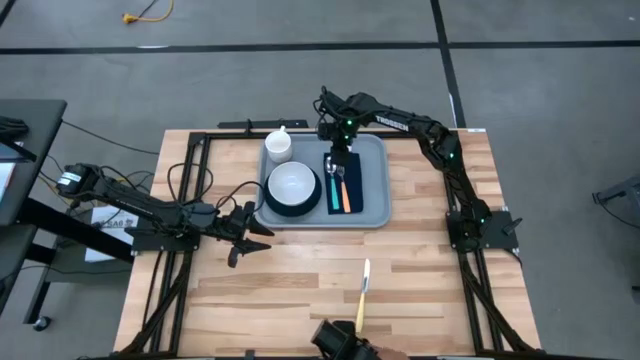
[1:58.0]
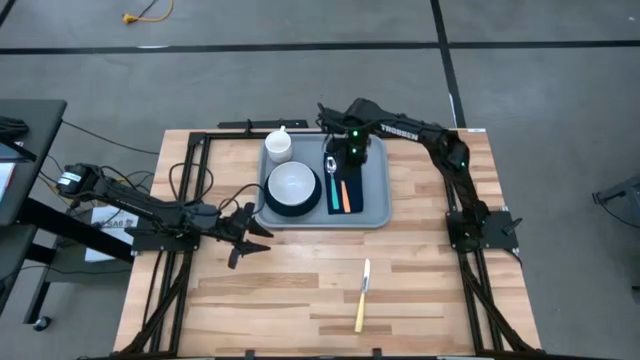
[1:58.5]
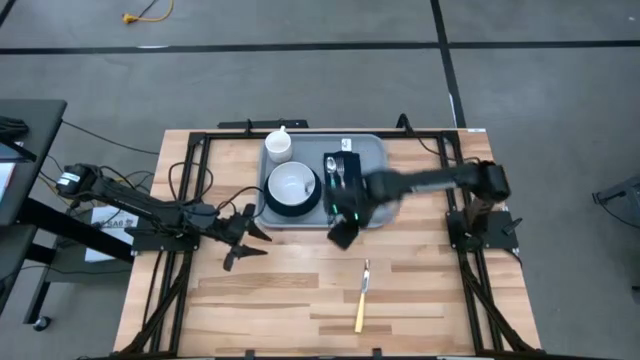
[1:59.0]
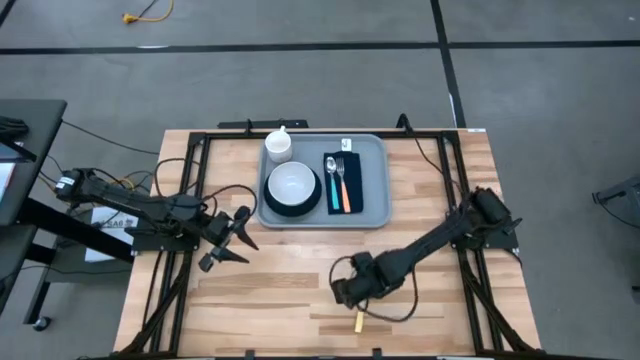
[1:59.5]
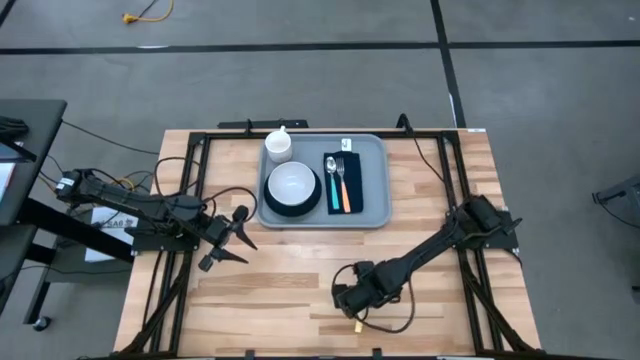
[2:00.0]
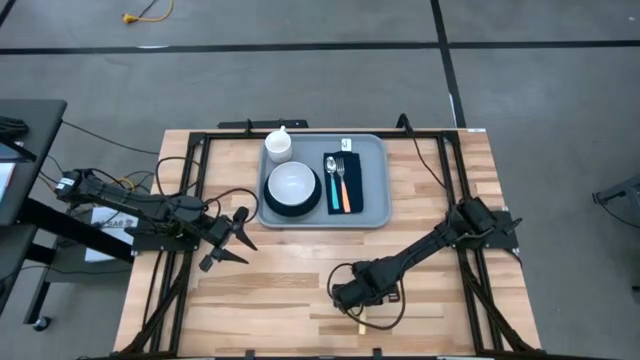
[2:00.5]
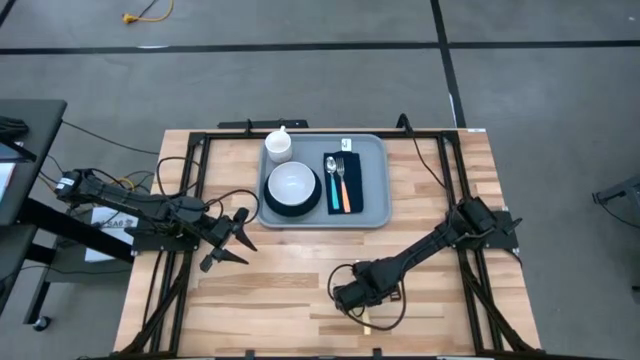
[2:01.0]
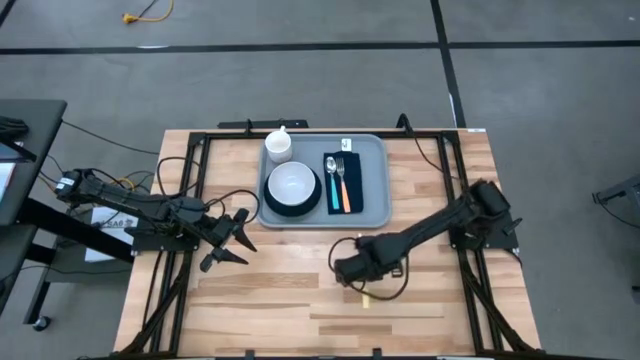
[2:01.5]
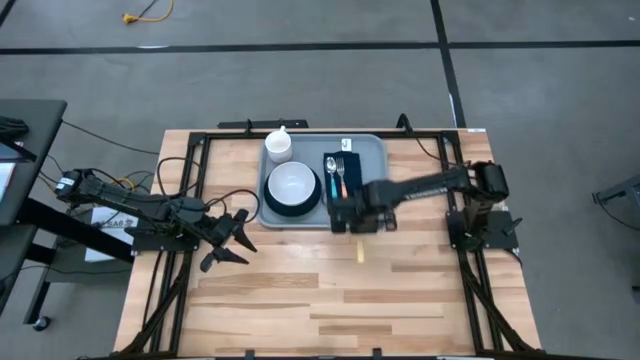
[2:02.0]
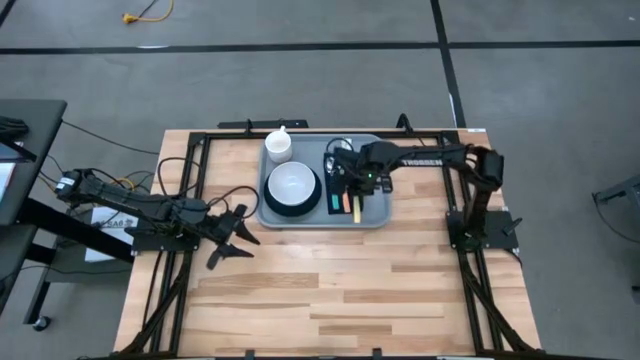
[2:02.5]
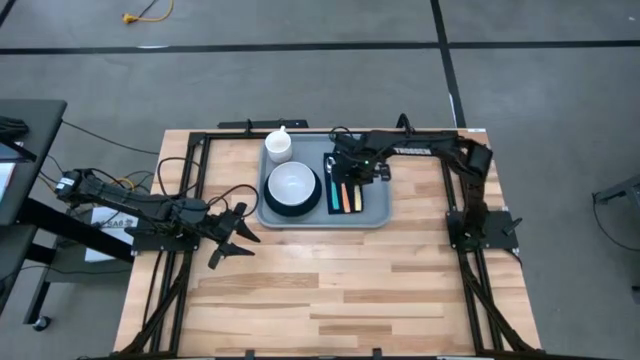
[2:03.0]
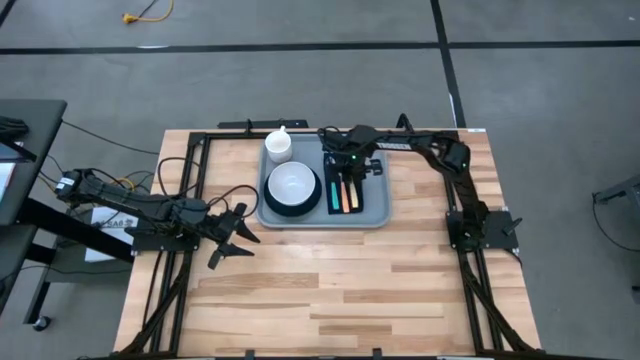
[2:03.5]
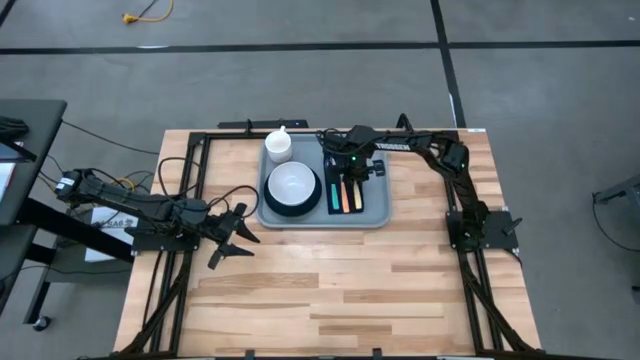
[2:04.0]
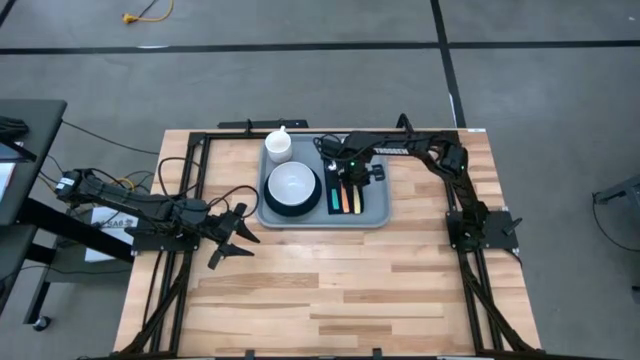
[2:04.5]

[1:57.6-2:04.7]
Task: Set up tray
Put the yellow knife on the dark blue napkin to the right of the orange fork

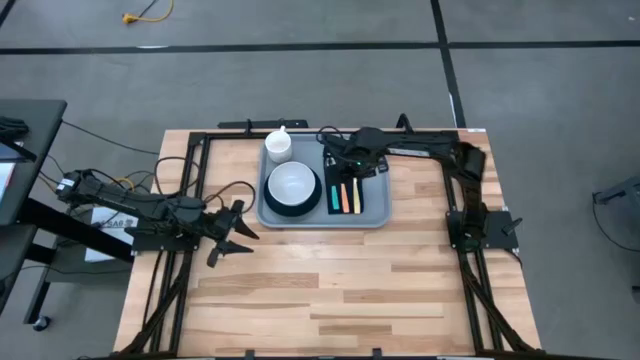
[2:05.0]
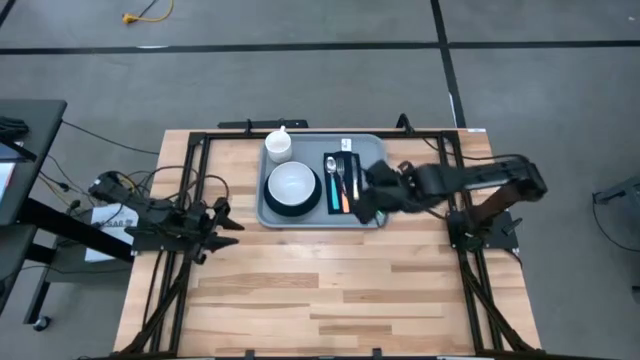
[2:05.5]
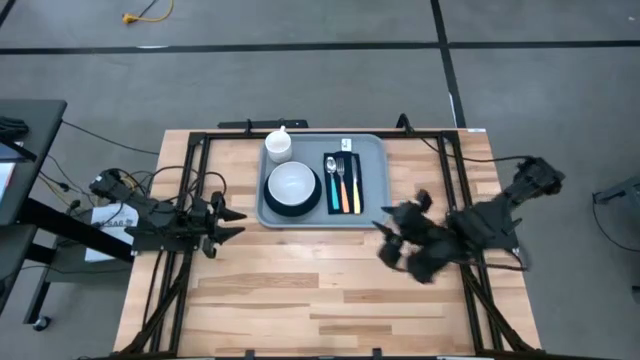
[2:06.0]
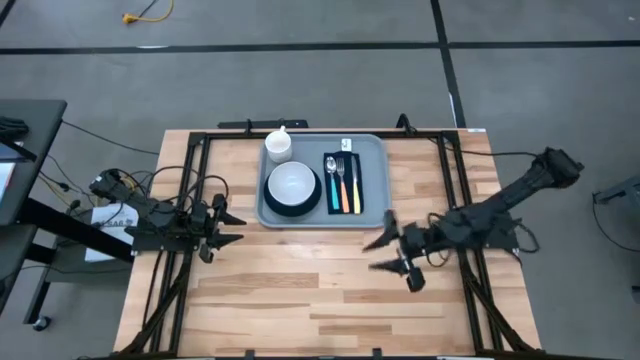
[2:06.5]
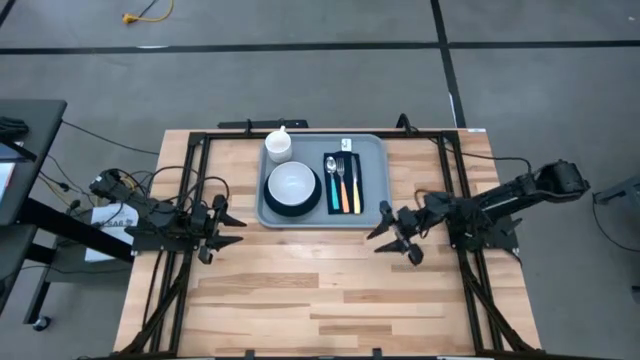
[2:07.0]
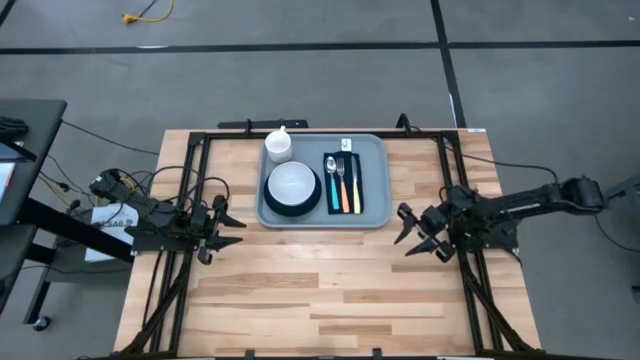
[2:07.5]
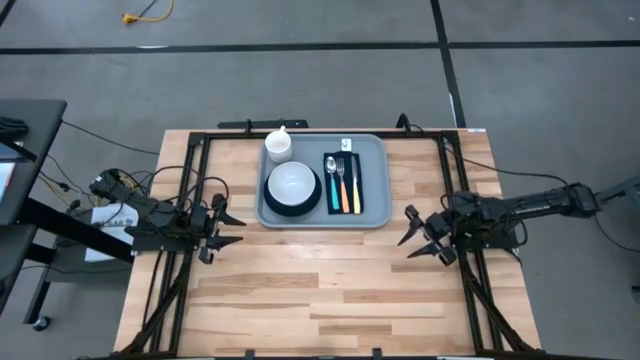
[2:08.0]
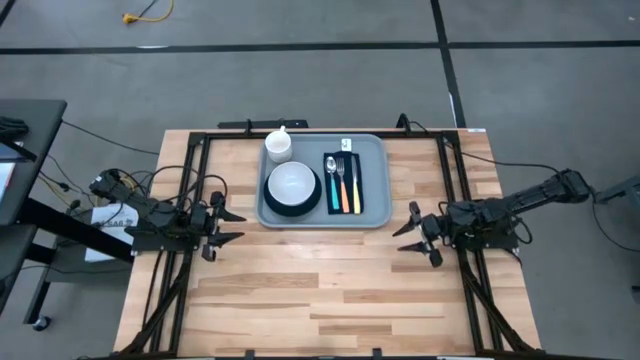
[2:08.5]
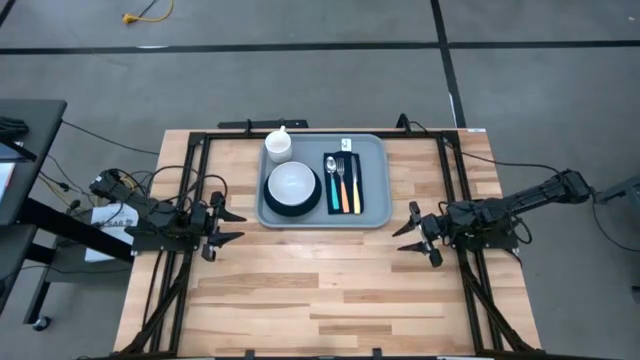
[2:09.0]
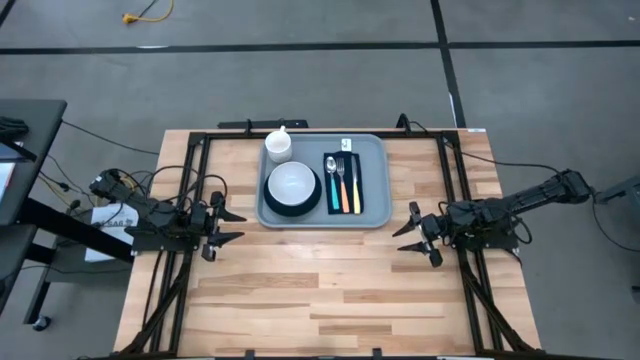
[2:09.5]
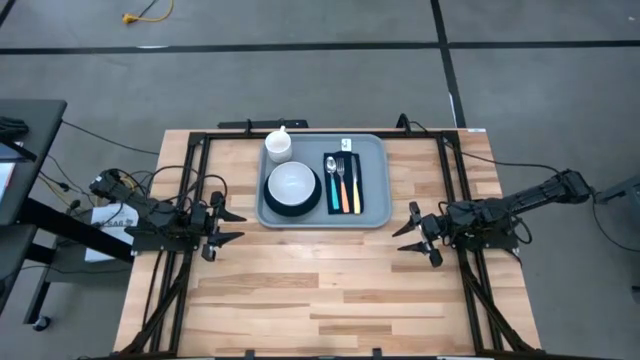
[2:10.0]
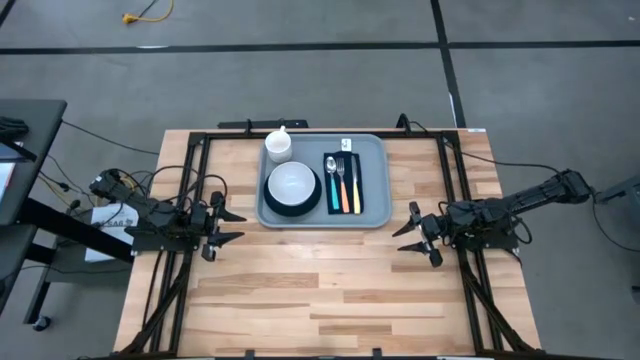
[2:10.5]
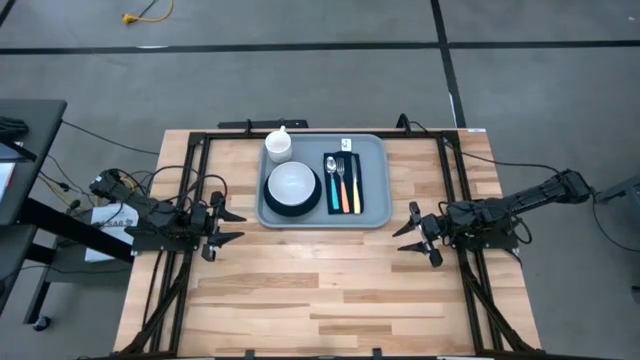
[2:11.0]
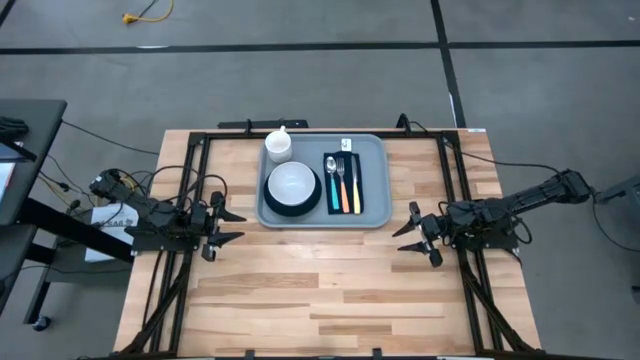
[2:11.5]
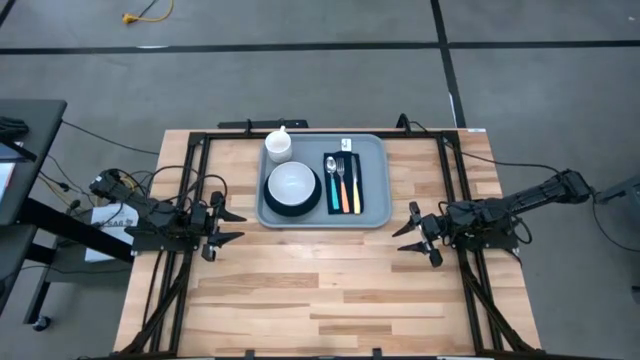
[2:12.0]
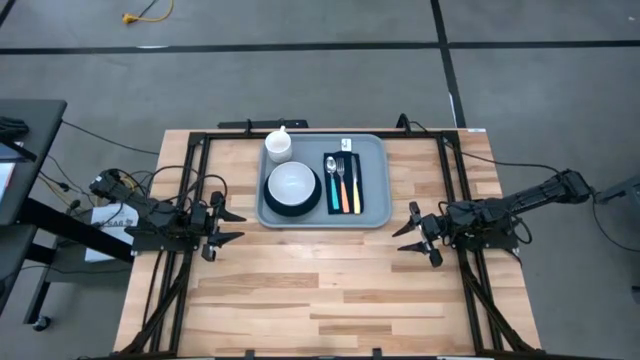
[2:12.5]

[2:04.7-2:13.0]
Return to Home Position

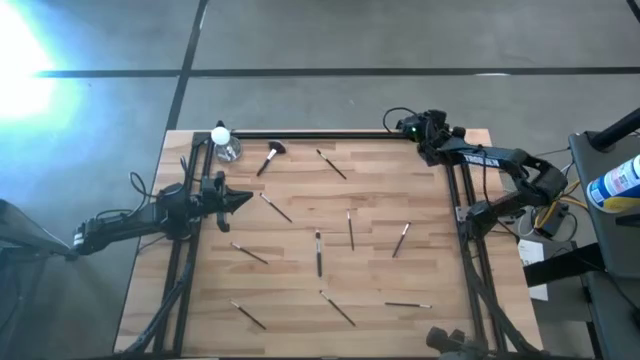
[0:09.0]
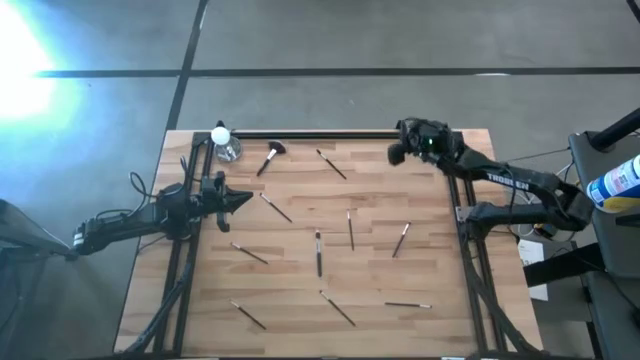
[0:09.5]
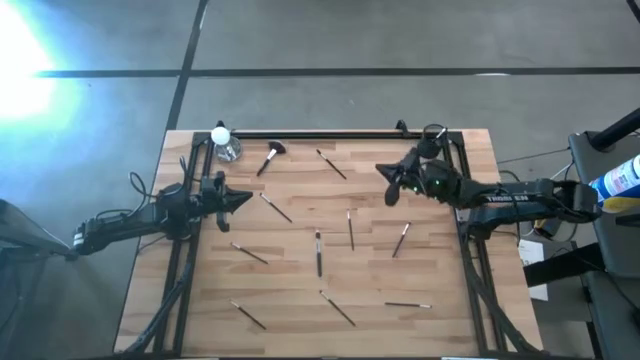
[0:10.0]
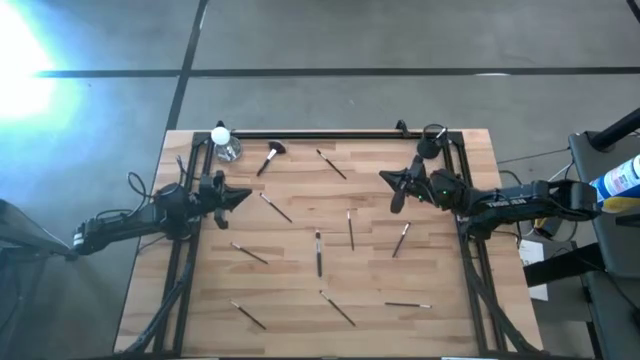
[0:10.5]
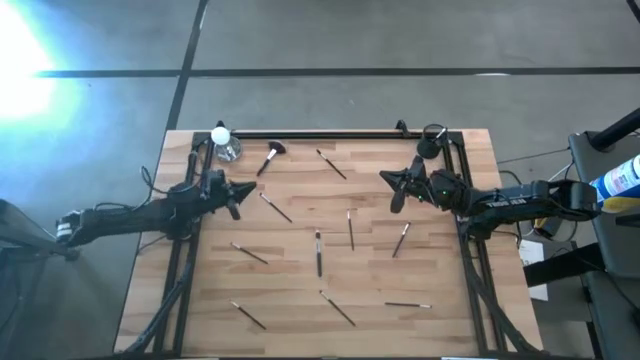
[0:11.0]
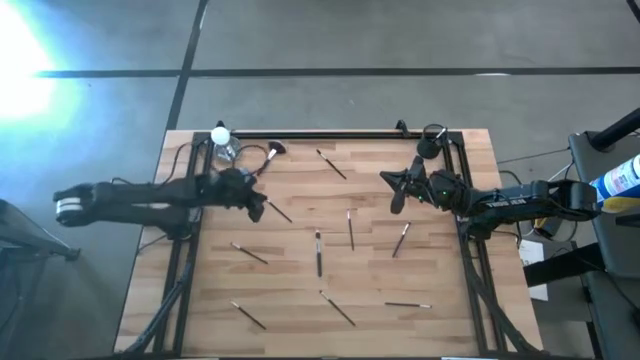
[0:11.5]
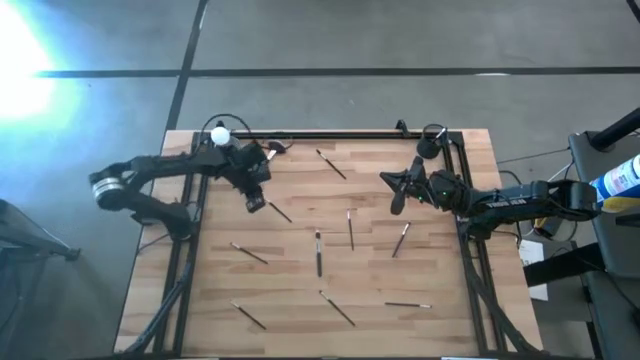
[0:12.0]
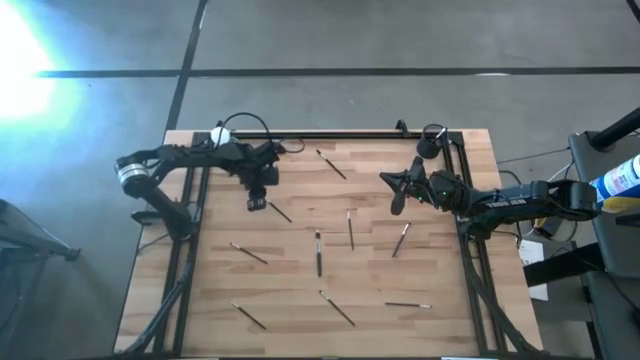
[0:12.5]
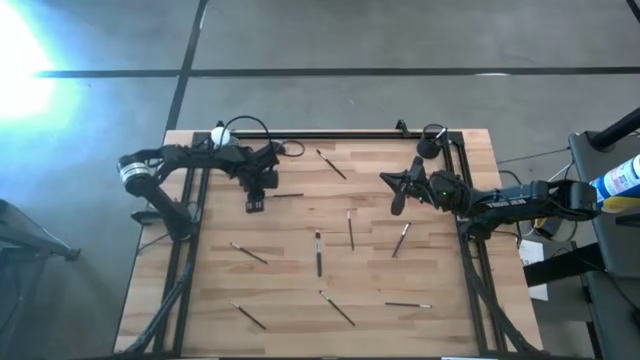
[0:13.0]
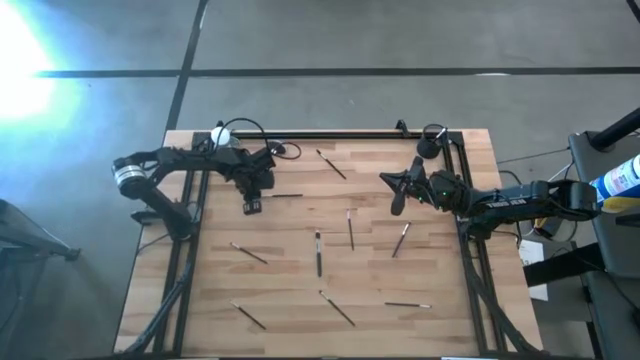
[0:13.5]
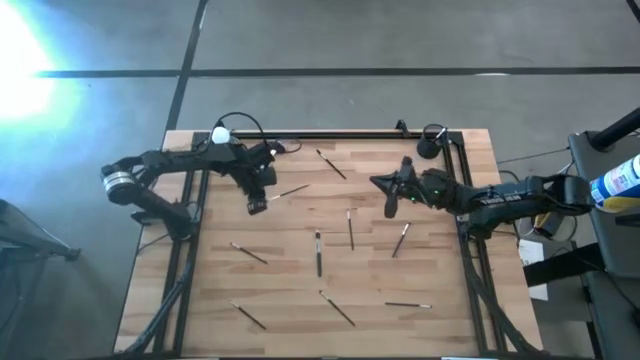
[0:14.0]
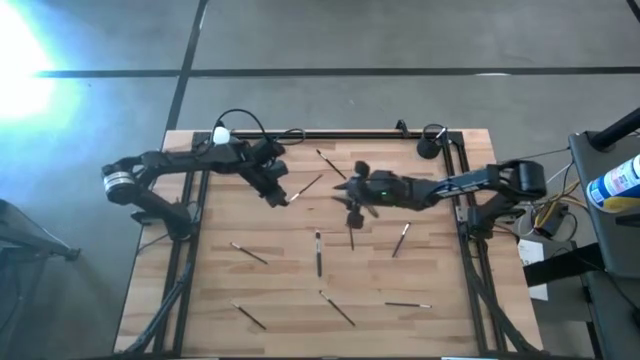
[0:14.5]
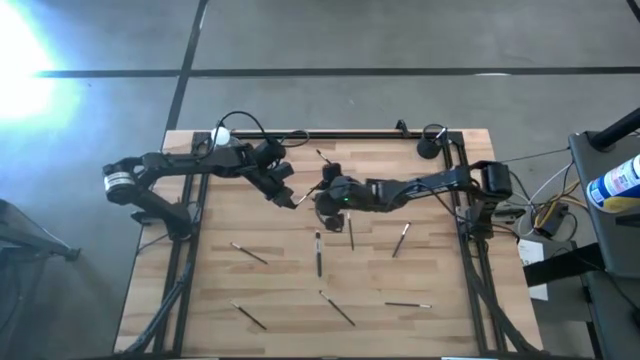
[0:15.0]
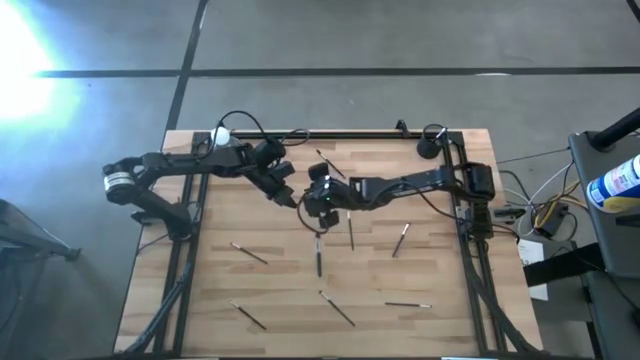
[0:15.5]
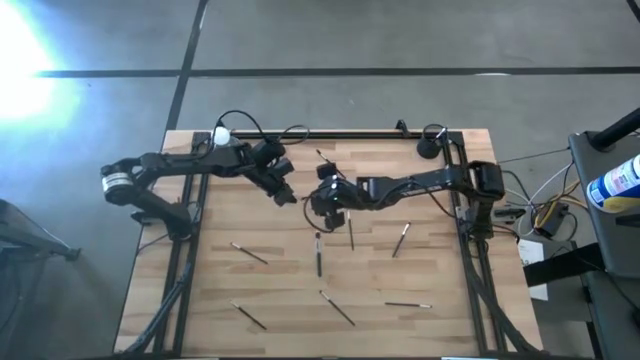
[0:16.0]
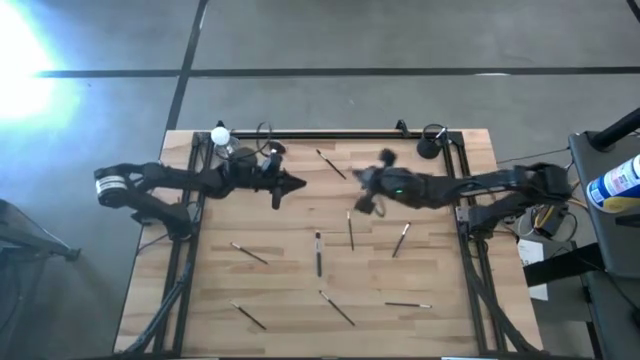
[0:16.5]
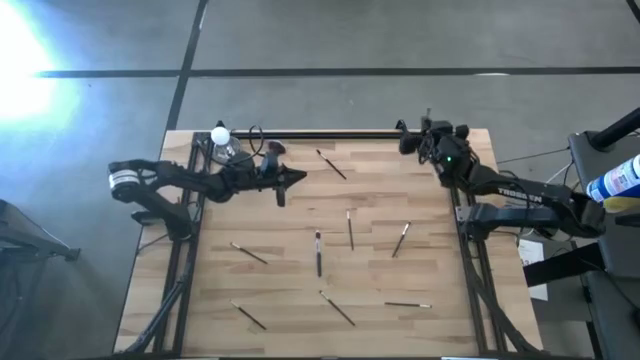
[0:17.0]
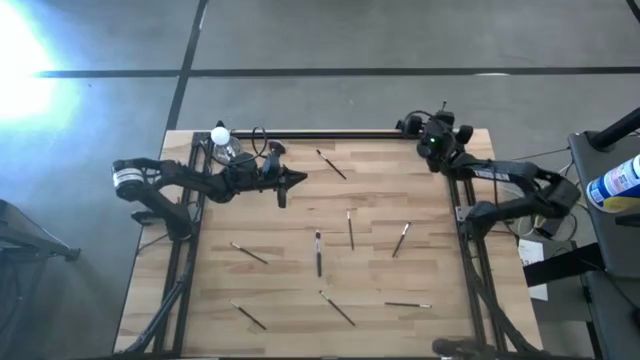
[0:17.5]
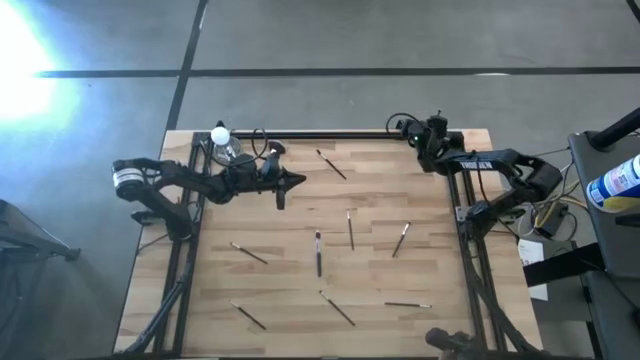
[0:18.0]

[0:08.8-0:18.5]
Task: Put items in baskets/containers
Put the foundation brush into the mesh organizer
